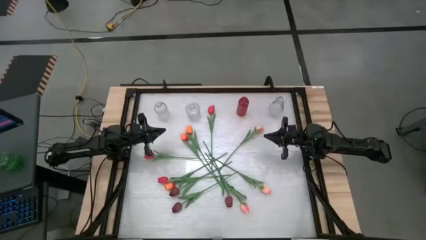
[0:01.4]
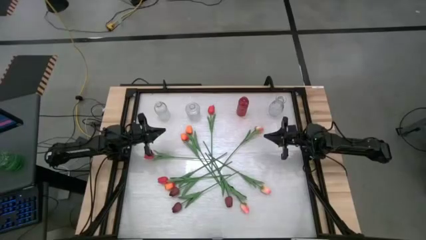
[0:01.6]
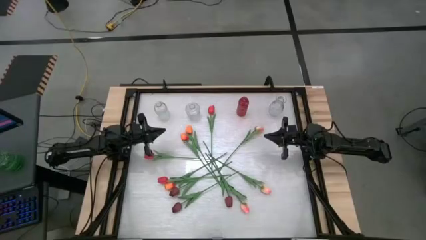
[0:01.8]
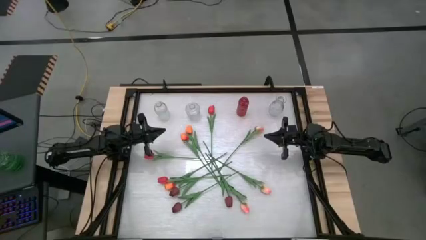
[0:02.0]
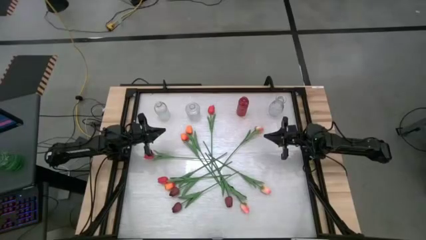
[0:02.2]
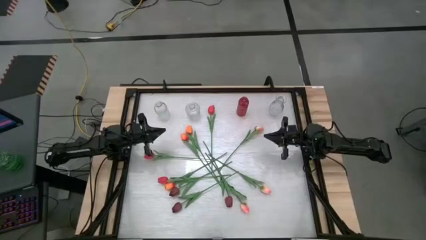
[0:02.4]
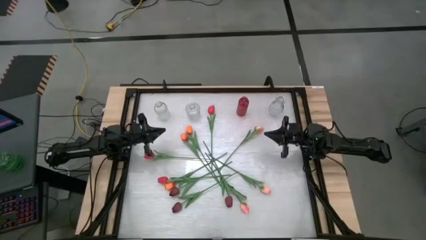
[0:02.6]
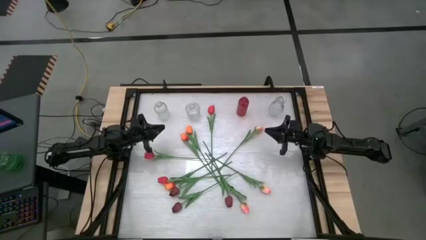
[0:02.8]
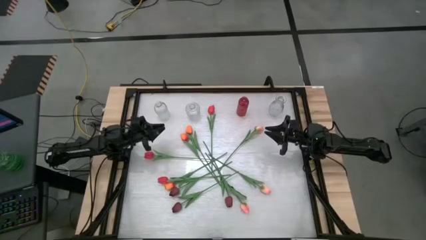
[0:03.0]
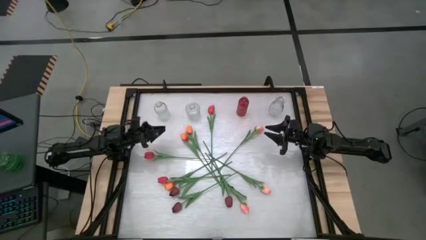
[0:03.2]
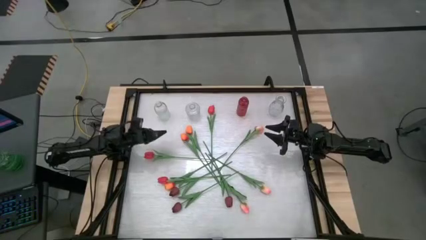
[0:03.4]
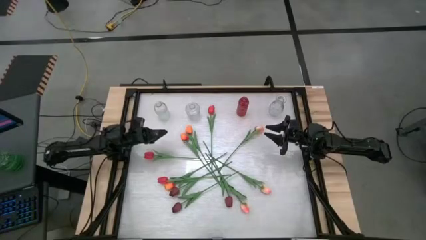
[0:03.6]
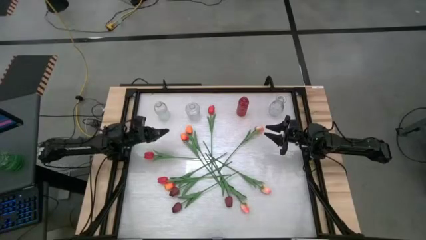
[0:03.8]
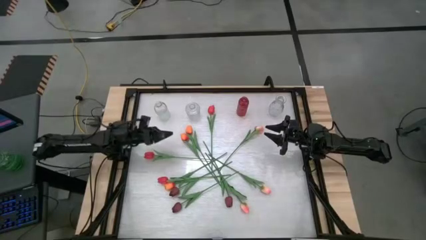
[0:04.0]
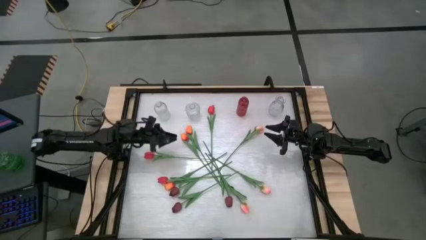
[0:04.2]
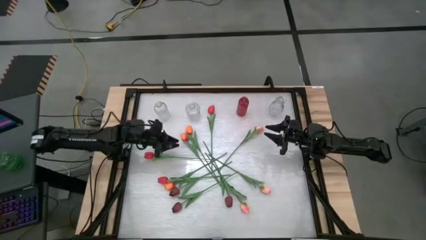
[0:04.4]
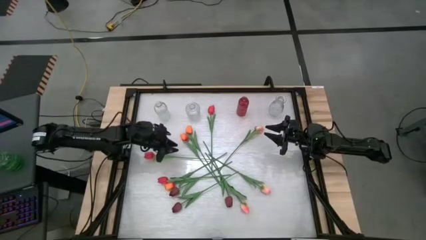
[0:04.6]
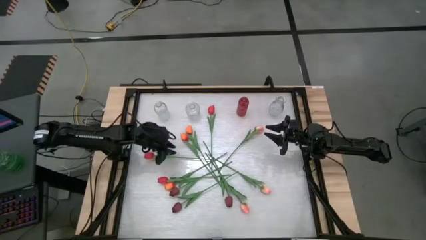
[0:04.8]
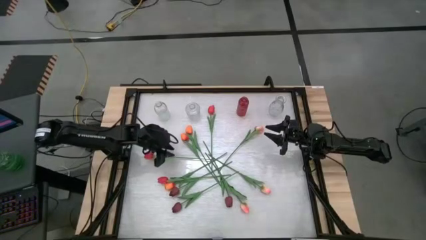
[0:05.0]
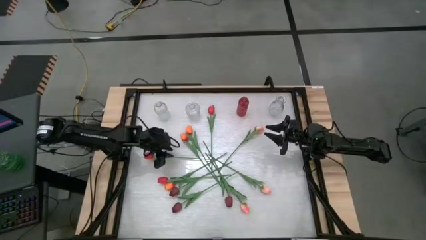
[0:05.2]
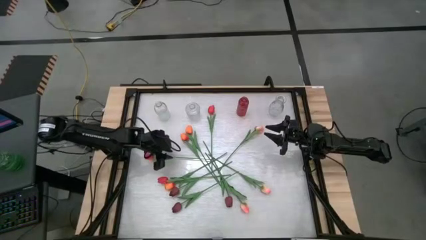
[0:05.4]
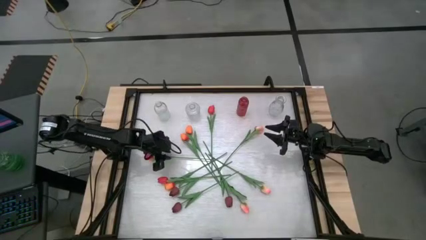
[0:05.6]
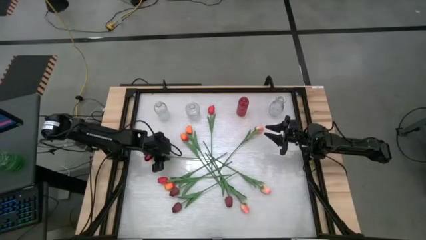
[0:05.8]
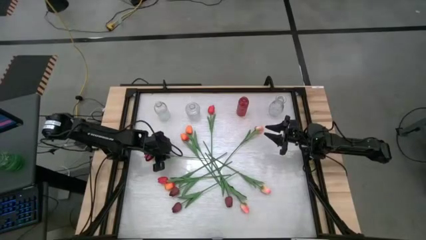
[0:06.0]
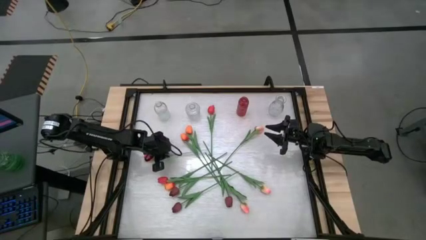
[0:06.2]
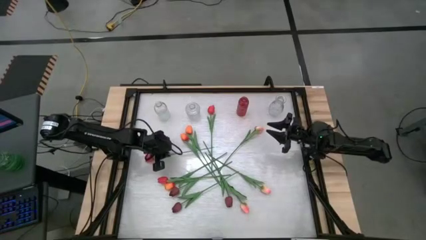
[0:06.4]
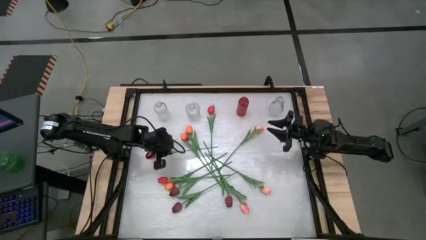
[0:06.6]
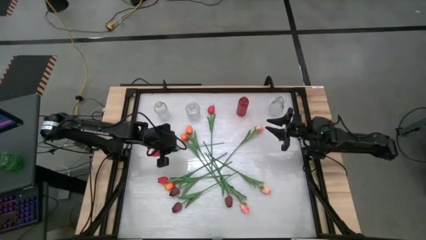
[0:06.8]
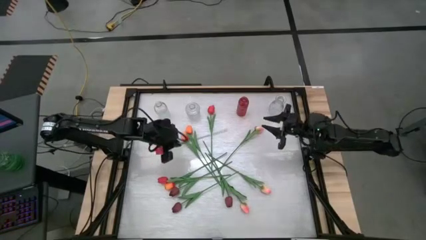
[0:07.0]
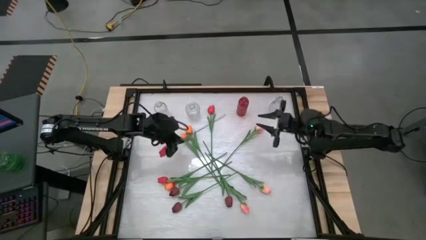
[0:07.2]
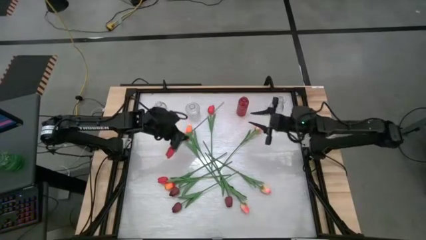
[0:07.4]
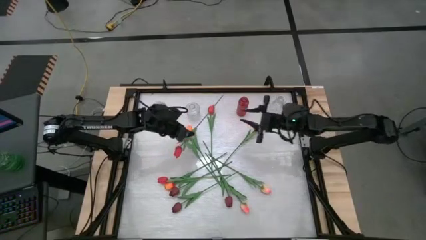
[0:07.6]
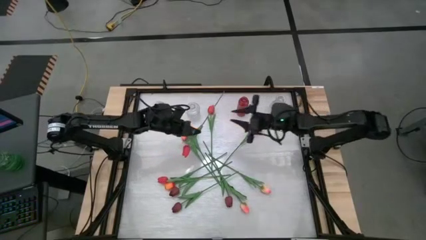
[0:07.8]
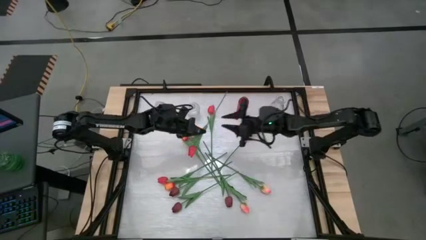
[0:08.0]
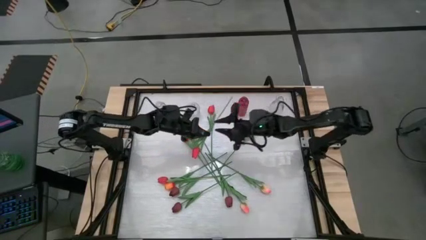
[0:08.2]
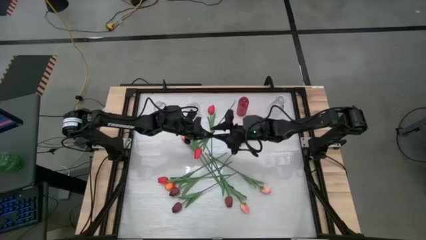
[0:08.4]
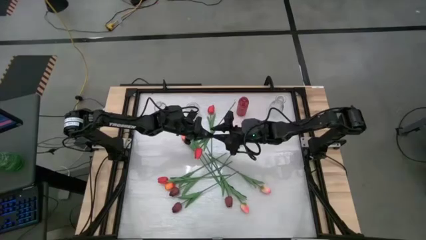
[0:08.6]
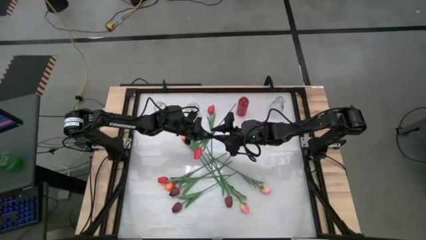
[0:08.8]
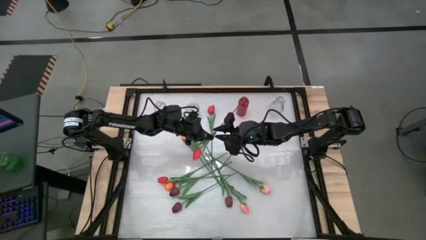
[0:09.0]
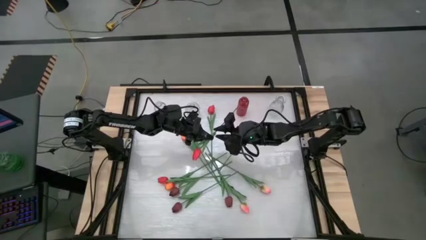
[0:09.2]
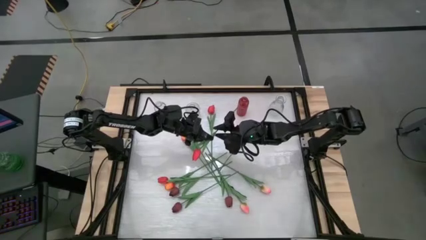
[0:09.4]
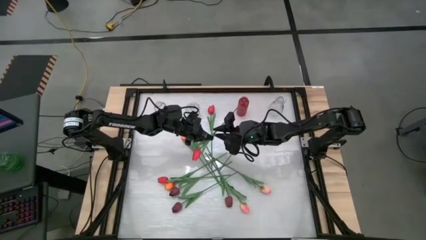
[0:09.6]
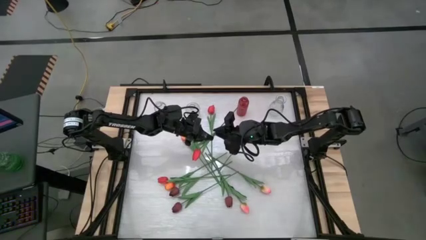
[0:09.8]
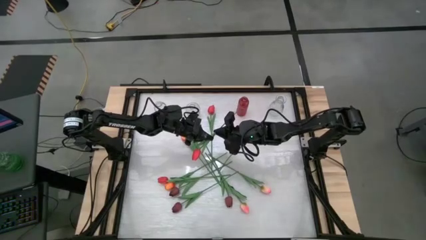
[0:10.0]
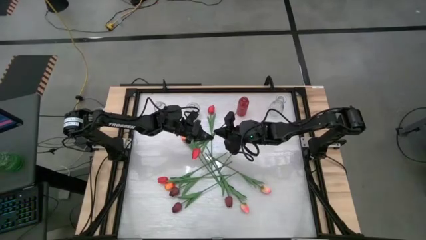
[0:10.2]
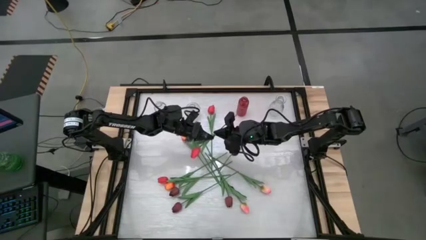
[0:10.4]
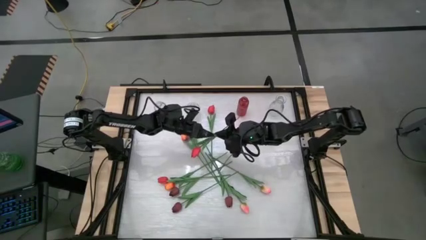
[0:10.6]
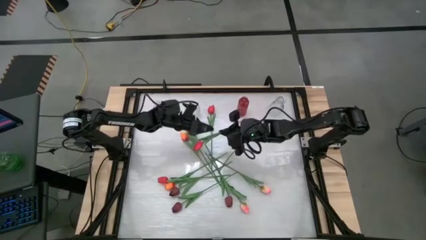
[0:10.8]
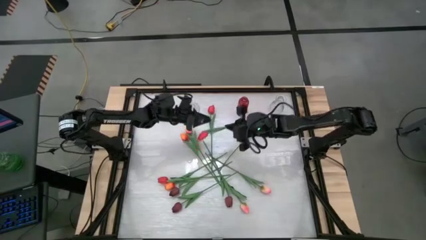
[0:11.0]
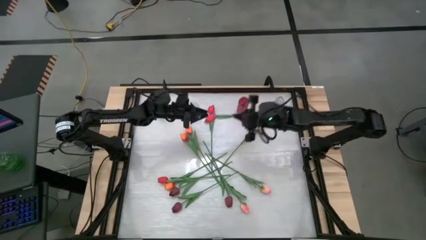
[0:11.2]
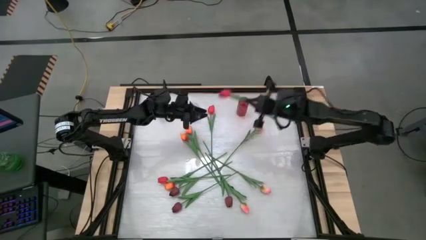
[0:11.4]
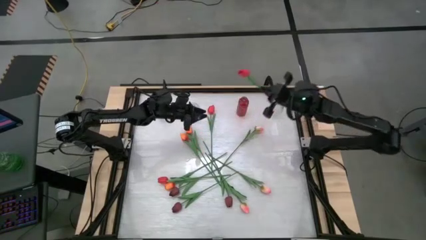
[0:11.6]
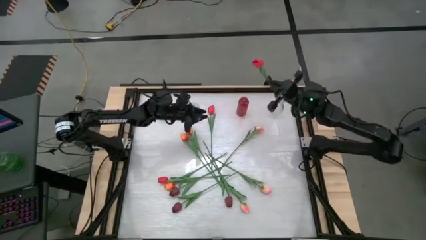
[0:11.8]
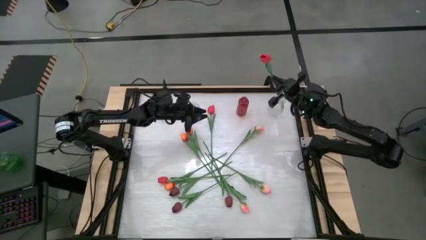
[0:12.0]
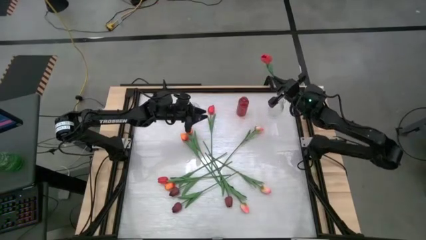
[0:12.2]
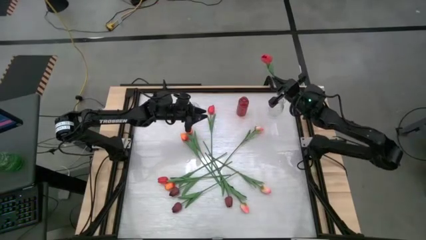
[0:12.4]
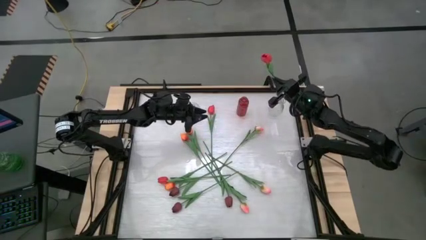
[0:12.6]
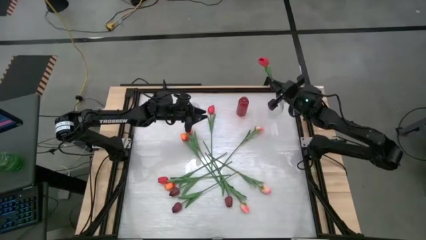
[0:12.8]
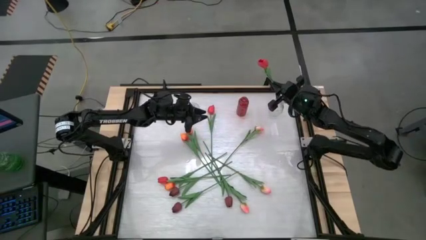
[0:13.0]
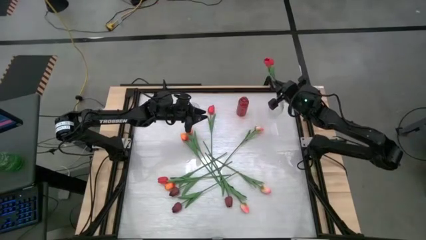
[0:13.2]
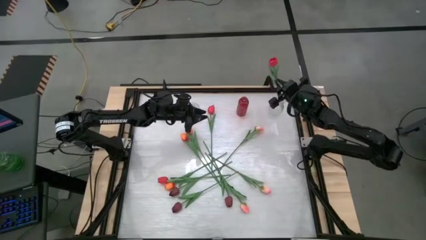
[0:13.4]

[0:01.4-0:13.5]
Task: Sort flowers into vase by color
Put the pink flower into the right transparent vase
